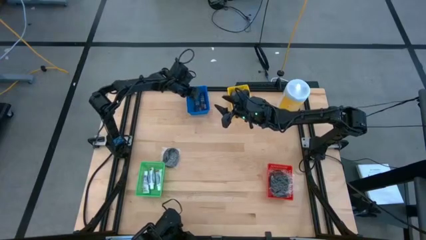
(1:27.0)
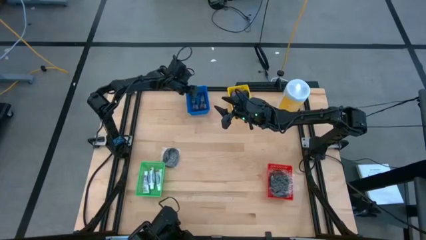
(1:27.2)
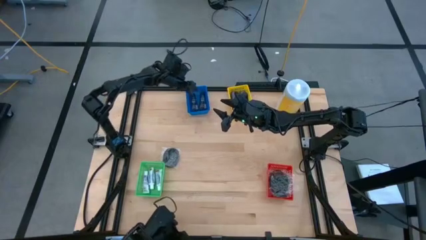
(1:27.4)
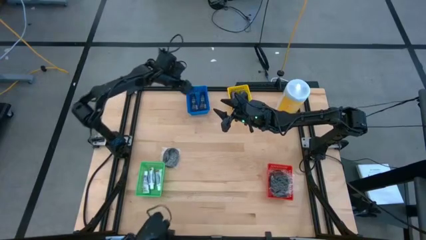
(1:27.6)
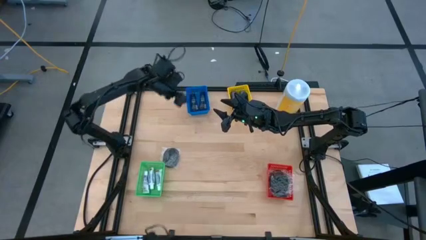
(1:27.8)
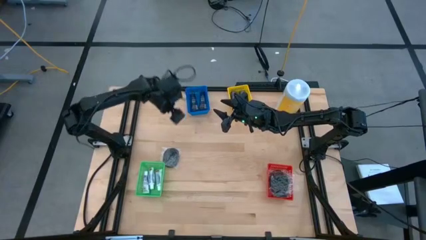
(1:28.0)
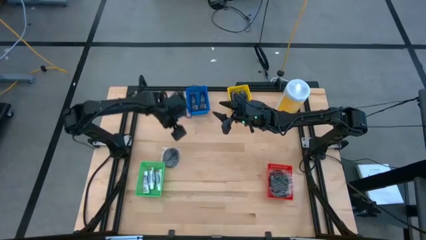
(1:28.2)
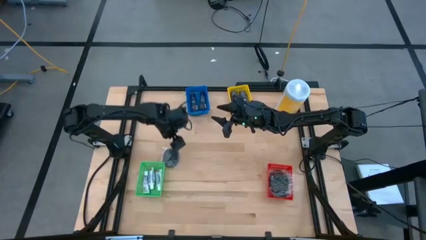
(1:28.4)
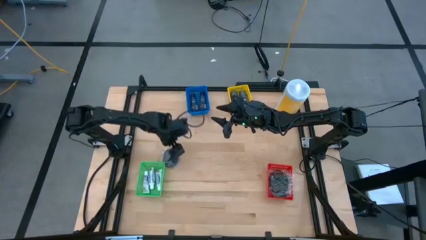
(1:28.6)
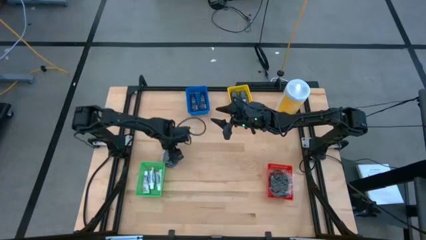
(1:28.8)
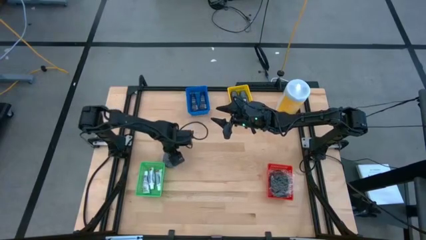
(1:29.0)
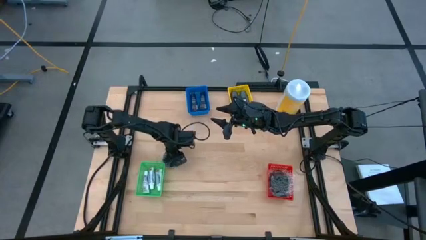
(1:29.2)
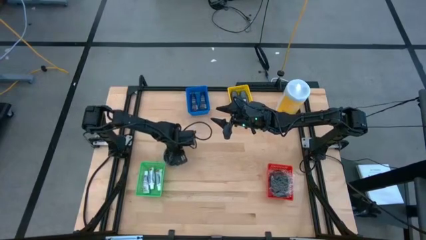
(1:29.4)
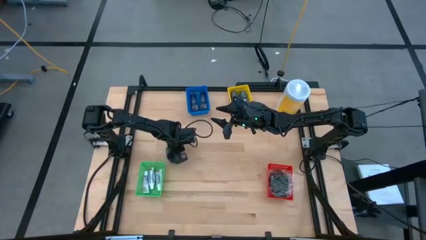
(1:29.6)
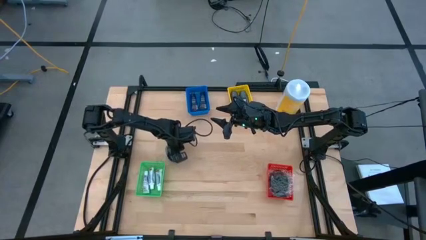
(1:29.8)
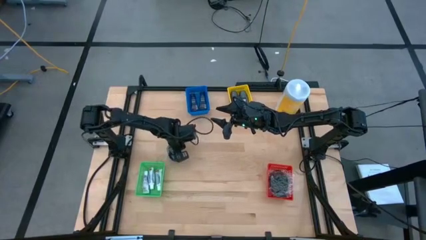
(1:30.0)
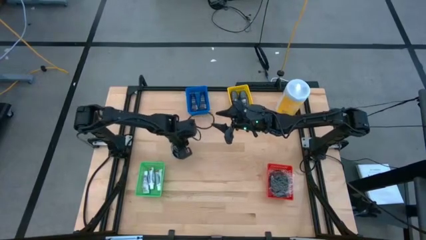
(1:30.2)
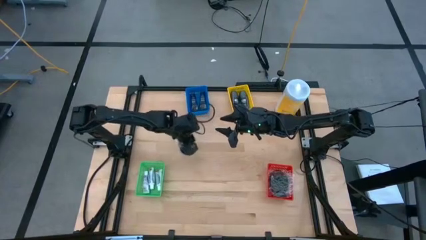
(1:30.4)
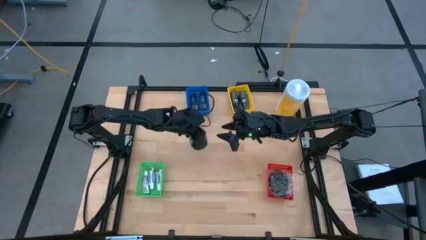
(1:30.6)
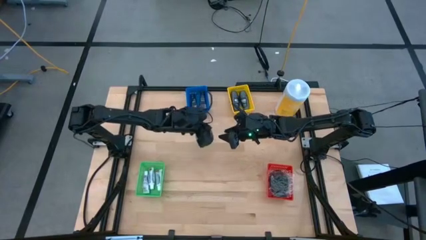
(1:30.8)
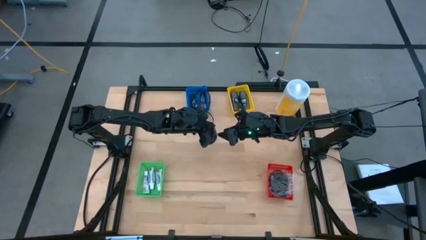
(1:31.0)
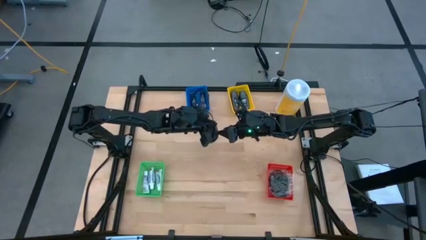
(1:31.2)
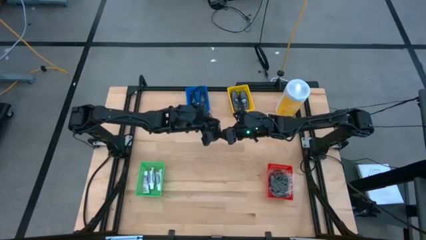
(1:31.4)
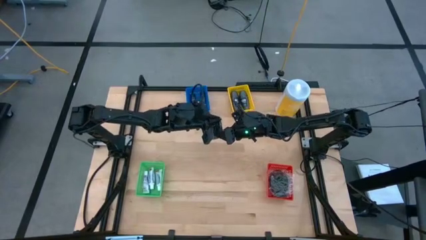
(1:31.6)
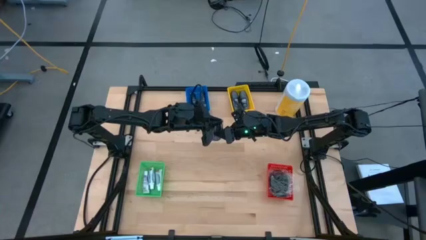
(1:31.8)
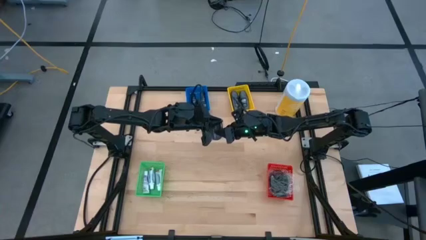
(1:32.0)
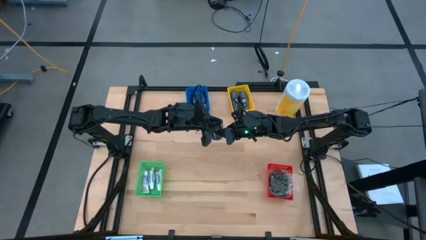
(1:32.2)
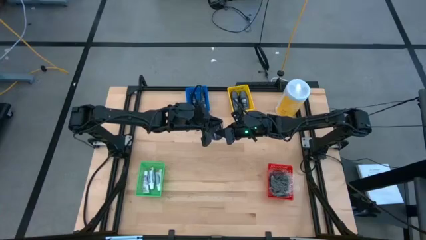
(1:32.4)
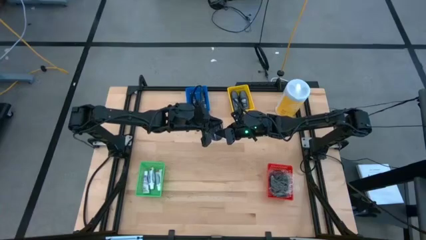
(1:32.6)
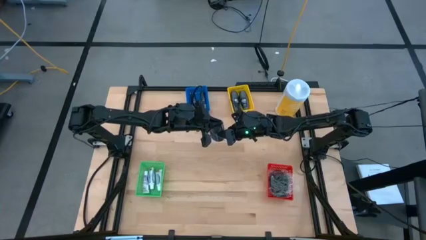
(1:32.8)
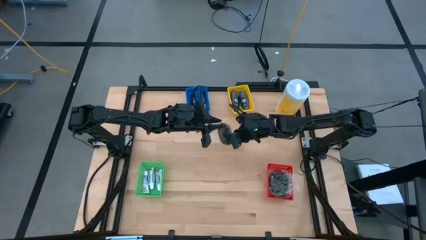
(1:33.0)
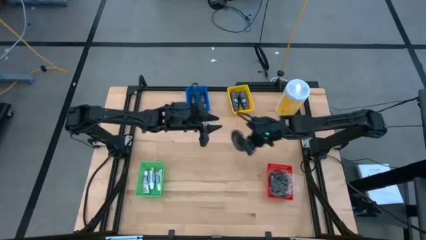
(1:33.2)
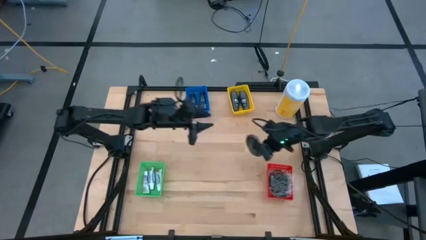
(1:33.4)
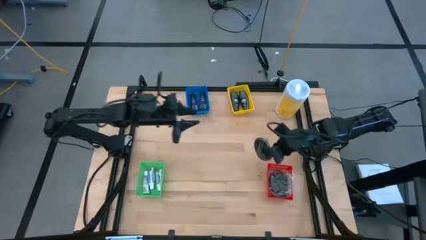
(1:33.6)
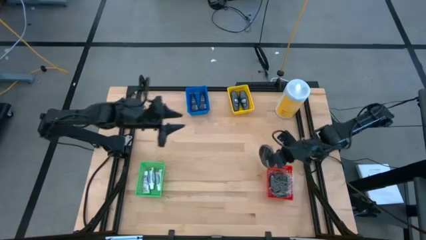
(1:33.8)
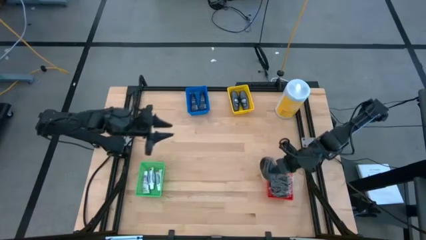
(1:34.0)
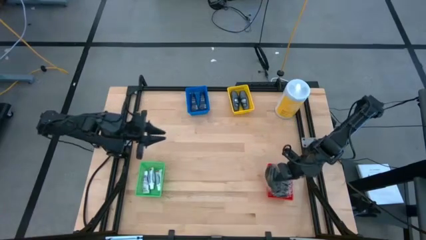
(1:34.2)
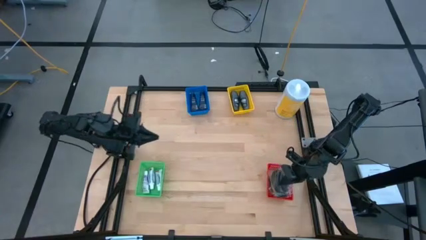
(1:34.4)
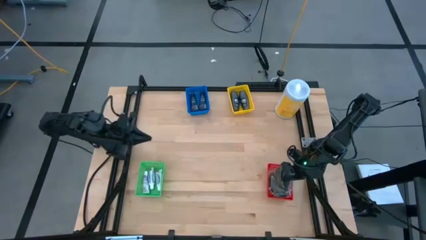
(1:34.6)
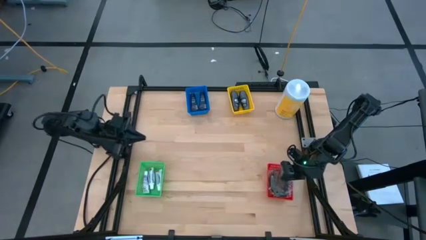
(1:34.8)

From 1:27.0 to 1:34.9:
Task: Pick & Place Travel size toiletries
Put the black hairbrush into the red bin

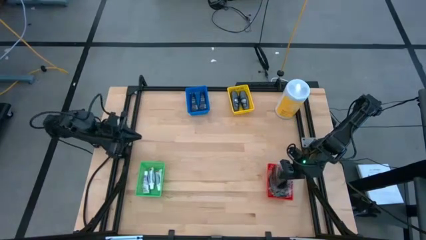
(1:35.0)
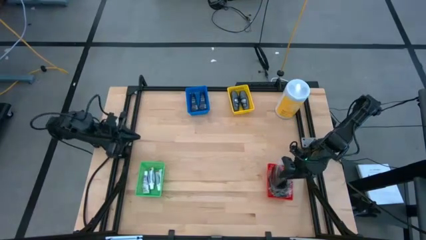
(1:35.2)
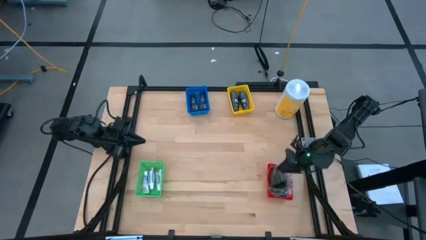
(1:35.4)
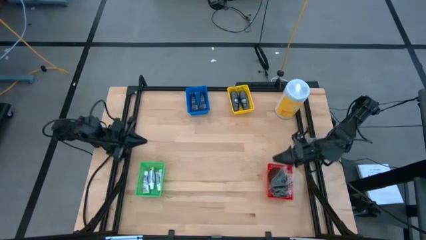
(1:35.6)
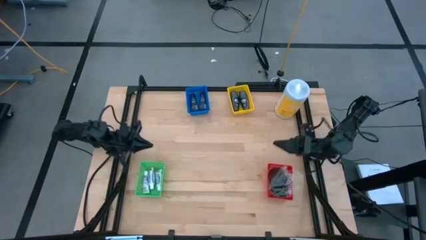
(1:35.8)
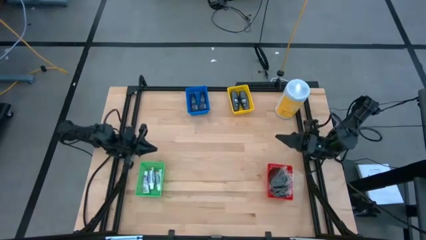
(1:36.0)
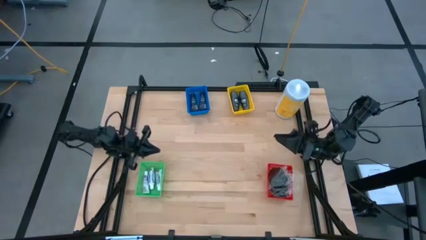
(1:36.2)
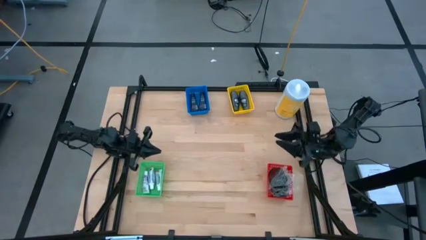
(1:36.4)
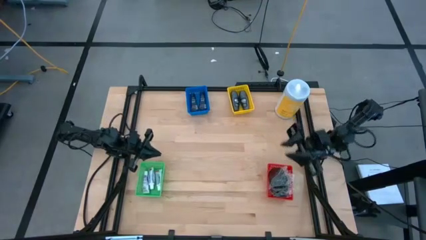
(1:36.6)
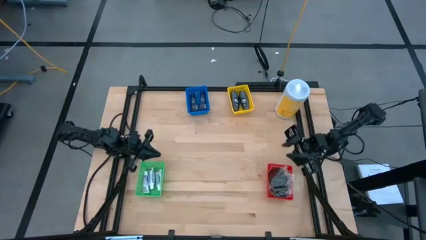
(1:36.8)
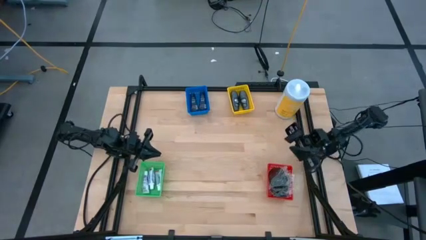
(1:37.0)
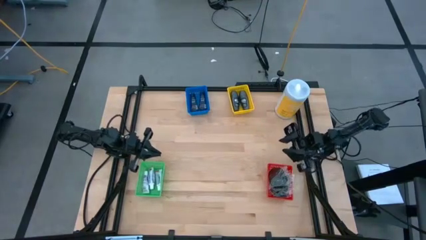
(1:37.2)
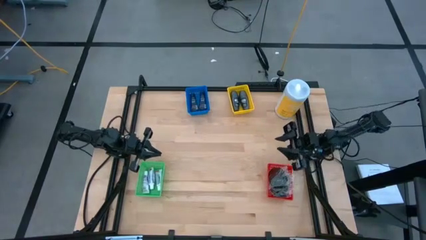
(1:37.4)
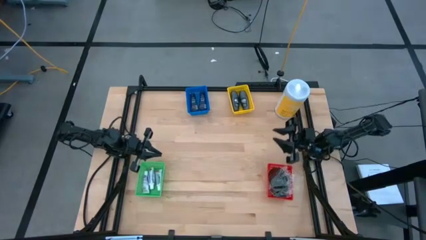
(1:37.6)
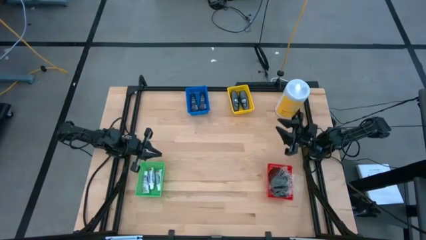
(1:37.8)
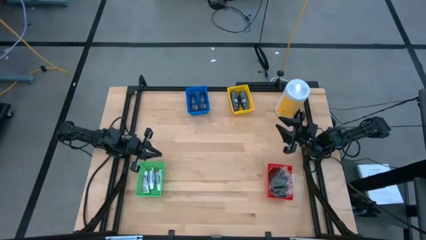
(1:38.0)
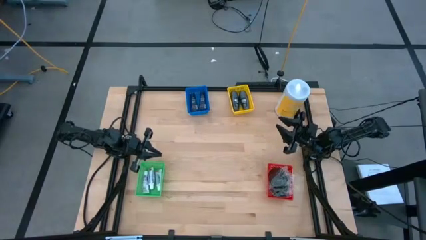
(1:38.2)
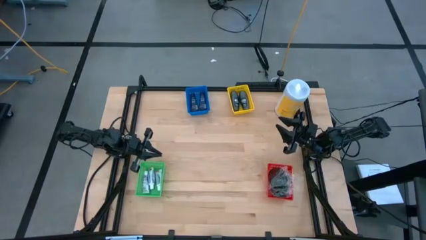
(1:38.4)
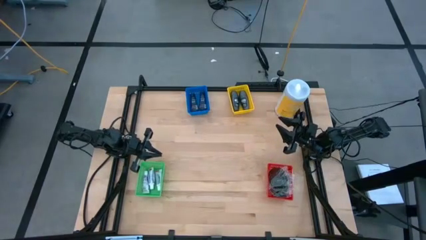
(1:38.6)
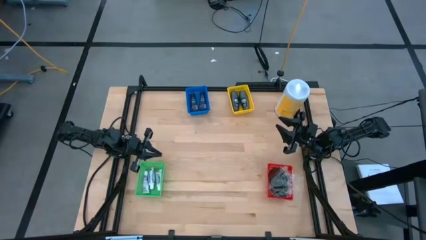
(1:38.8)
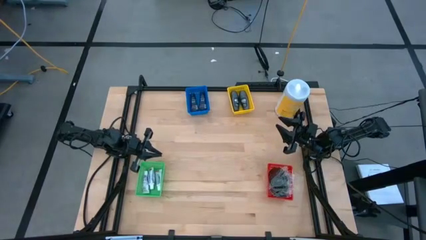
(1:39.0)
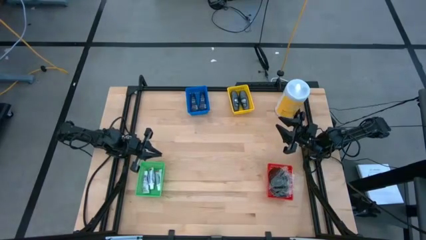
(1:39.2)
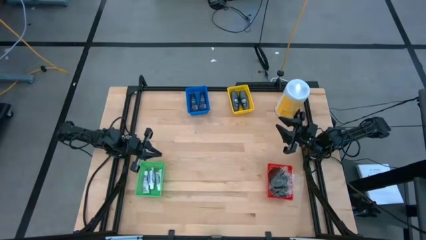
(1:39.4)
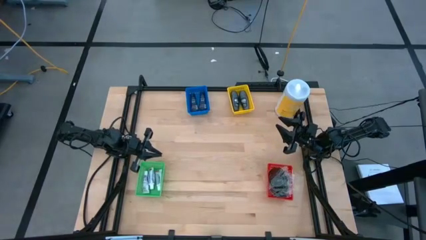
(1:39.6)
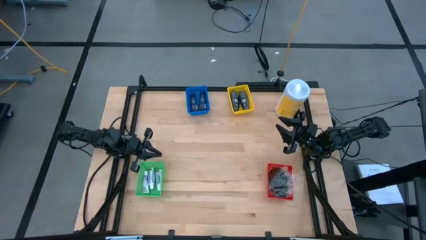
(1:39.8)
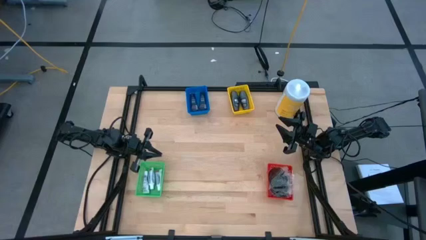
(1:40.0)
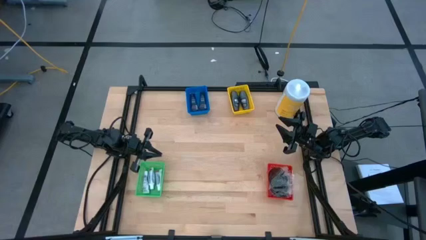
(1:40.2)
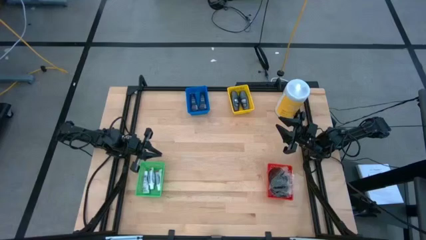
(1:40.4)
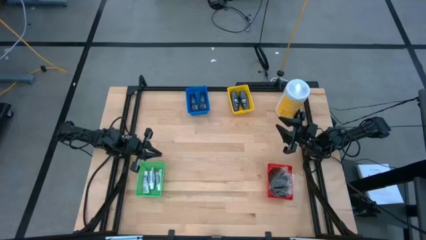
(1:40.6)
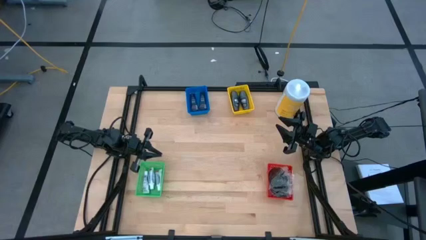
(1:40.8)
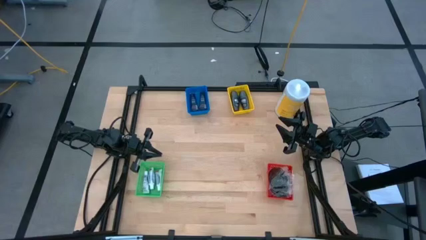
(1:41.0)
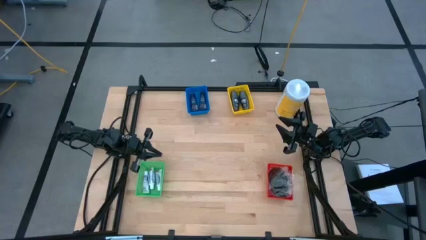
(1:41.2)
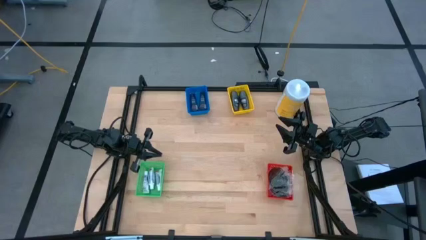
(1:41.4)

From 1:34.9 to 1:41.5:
Return to Home Position

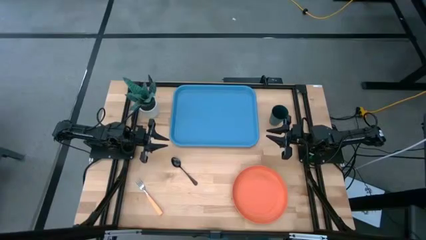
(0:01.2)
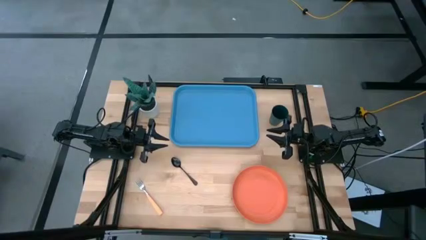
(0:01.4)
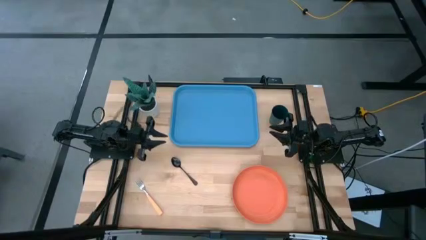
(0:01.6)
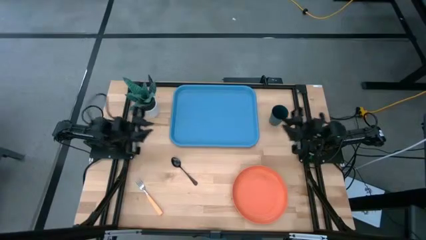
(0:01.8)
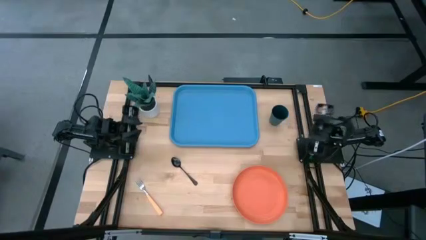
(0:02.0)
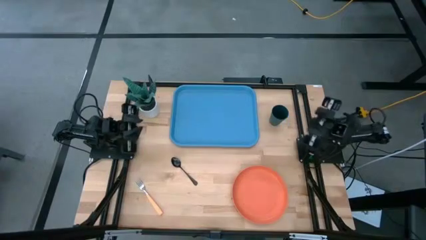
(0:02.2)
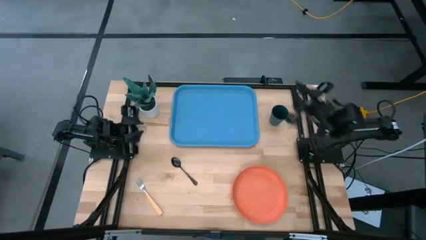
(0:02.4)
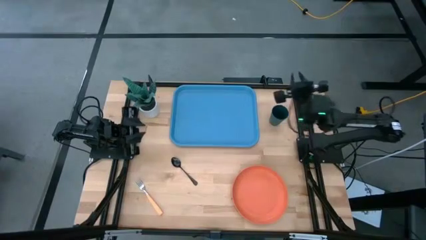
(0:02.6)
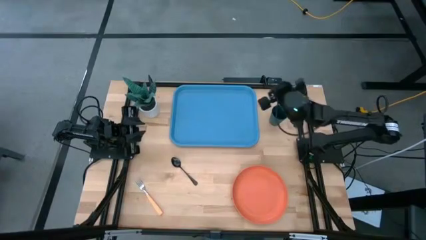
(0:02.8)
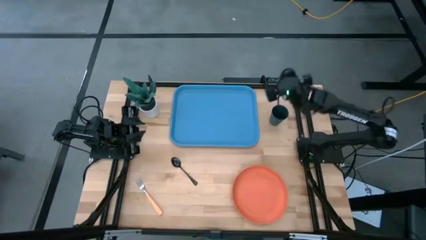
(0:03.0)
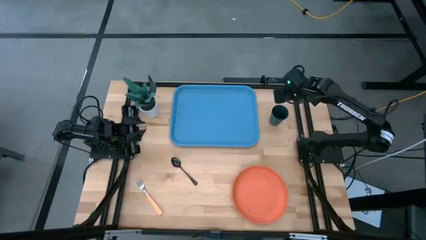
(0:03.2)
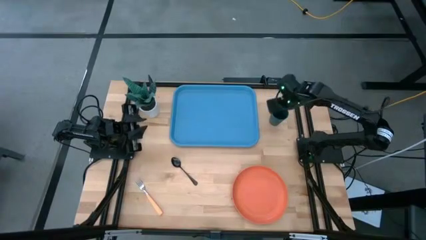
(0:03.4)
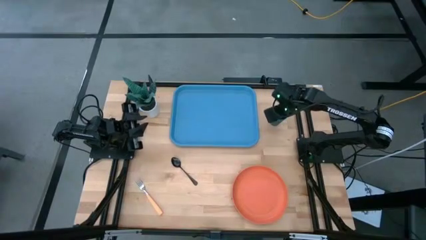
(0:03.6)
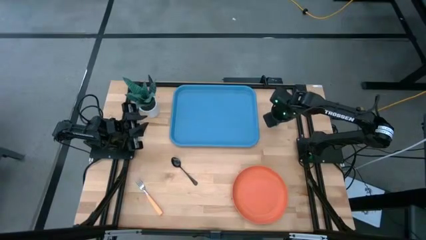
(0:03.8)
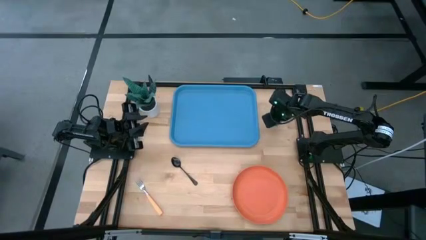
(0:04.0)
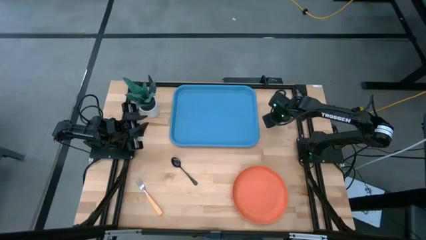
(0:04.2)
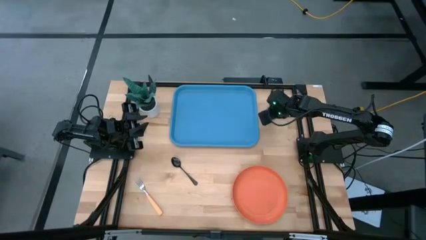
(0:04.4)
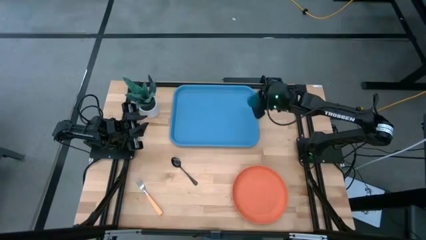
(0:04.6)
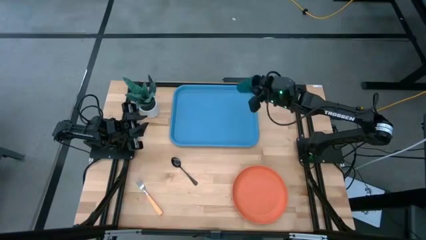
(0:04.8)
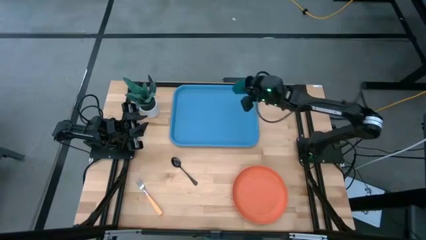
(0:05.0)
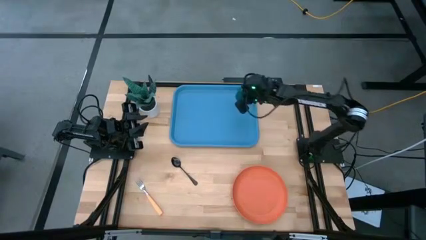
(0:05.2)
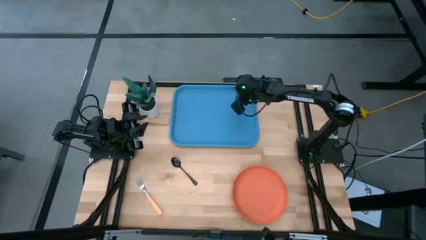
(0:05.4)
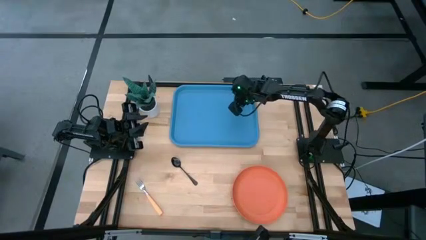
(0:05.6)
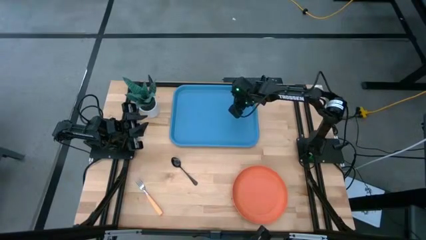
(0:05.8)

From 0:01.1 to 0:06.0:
Task: Pick and place plate/cup/fork/spoon on tray
Put the green cup on the tray
